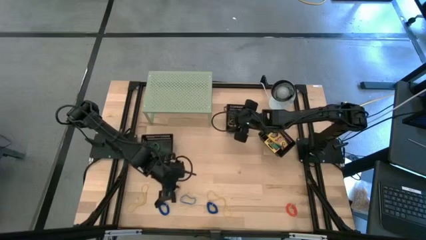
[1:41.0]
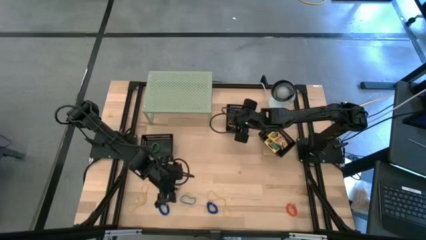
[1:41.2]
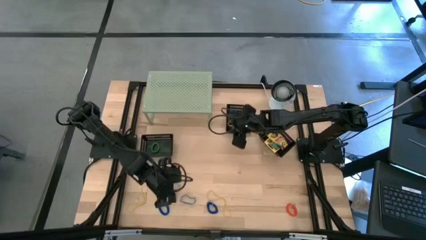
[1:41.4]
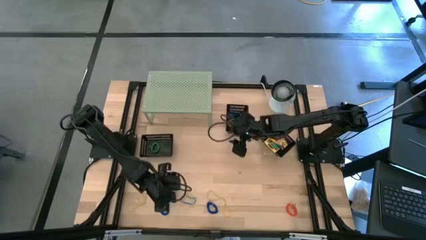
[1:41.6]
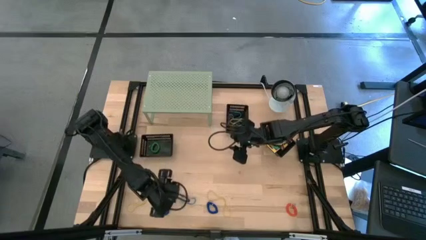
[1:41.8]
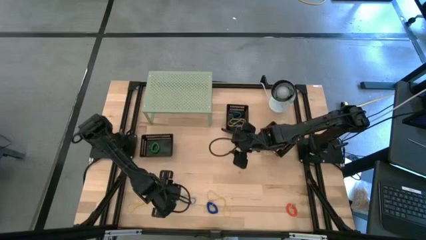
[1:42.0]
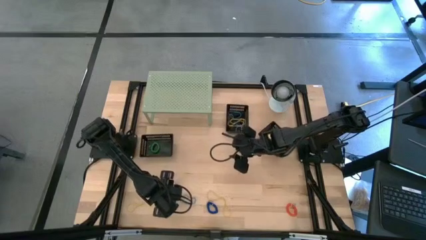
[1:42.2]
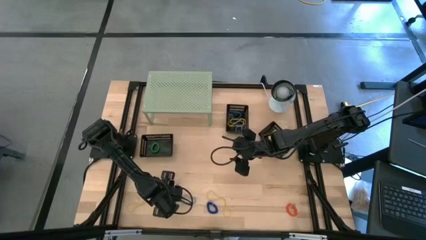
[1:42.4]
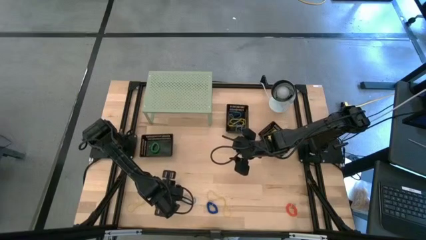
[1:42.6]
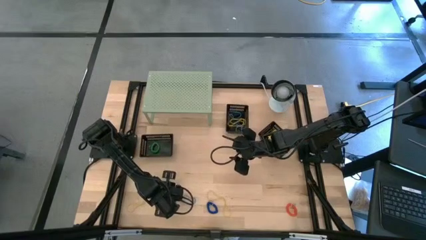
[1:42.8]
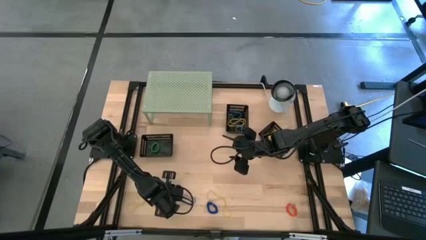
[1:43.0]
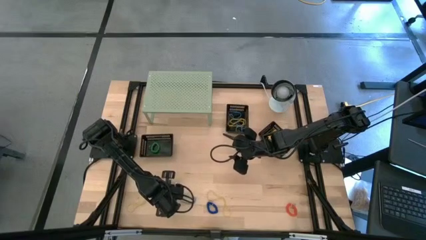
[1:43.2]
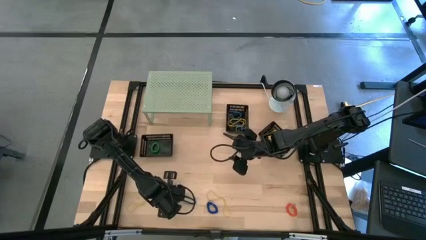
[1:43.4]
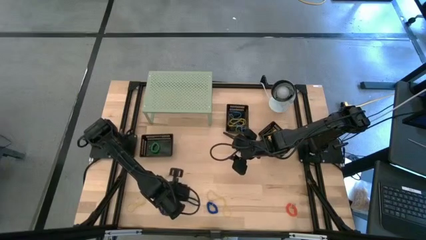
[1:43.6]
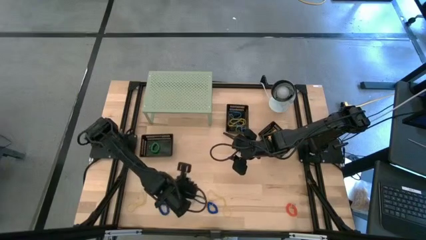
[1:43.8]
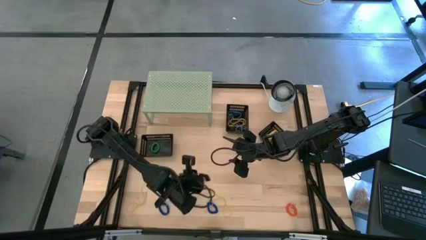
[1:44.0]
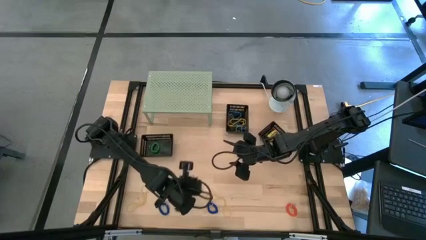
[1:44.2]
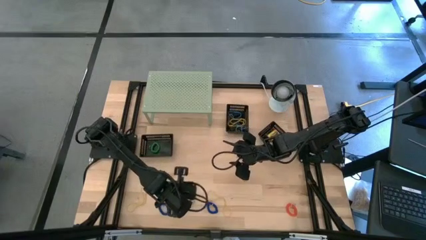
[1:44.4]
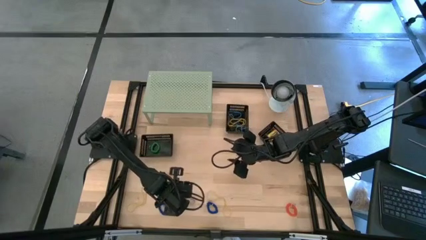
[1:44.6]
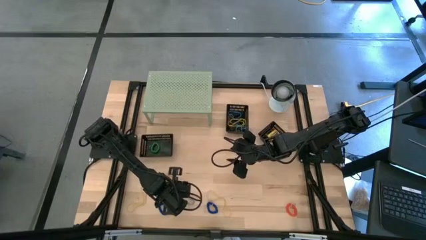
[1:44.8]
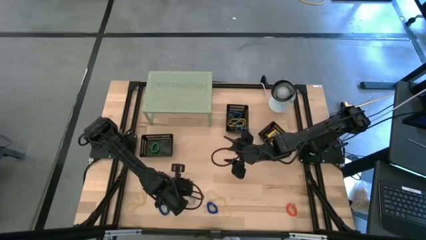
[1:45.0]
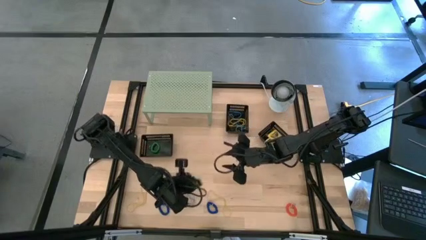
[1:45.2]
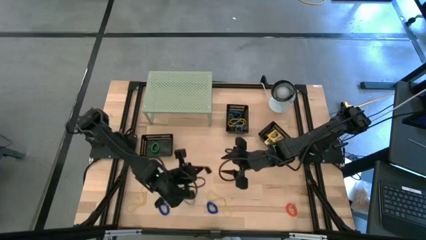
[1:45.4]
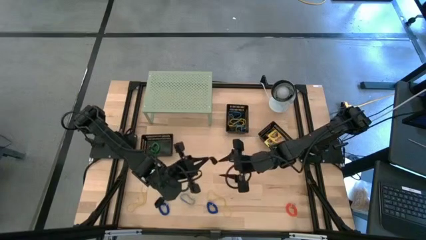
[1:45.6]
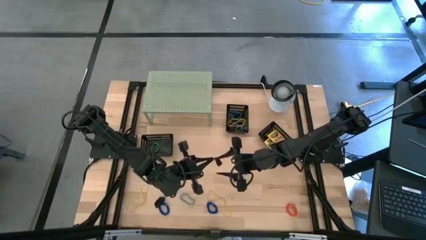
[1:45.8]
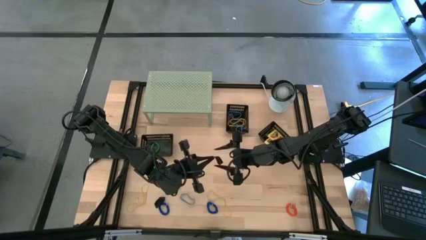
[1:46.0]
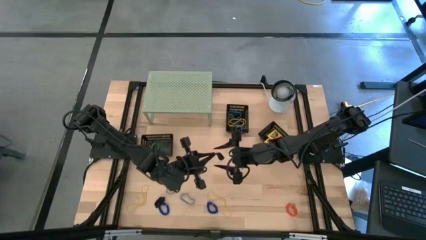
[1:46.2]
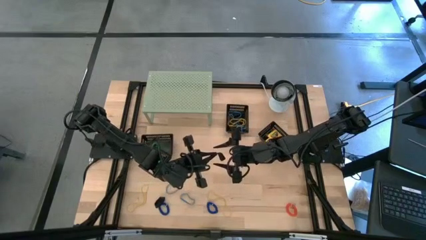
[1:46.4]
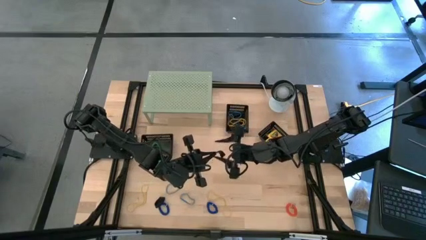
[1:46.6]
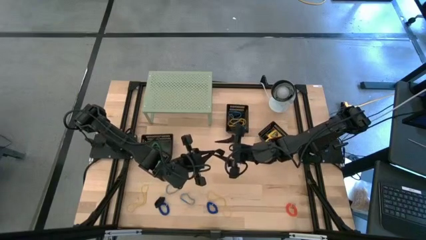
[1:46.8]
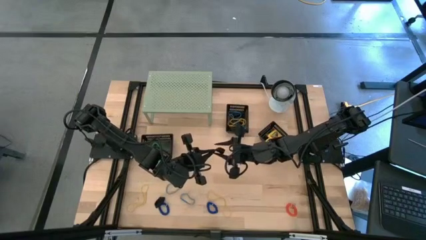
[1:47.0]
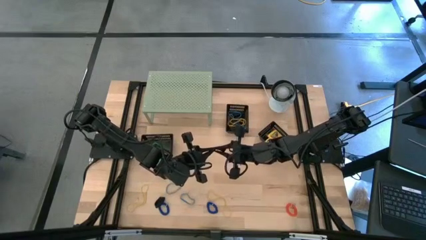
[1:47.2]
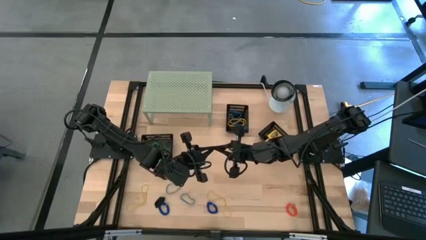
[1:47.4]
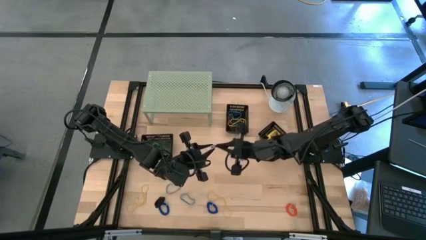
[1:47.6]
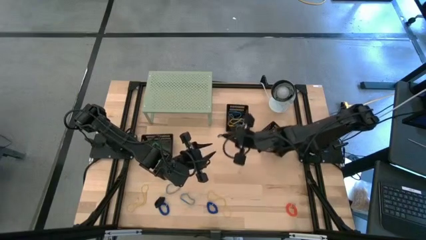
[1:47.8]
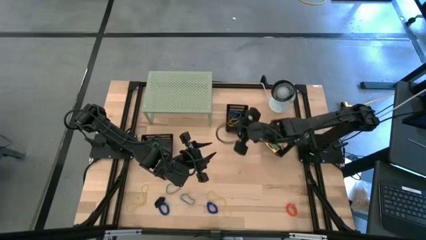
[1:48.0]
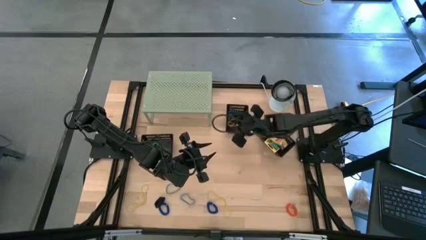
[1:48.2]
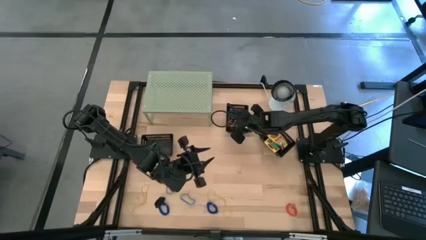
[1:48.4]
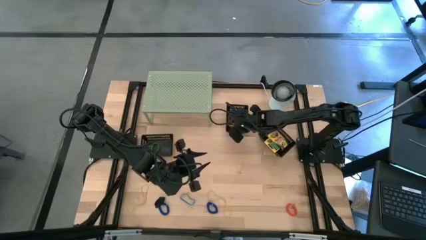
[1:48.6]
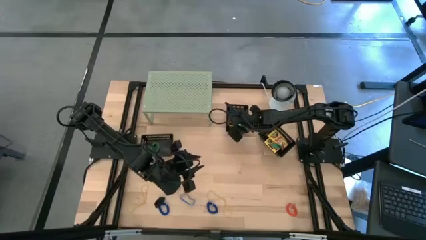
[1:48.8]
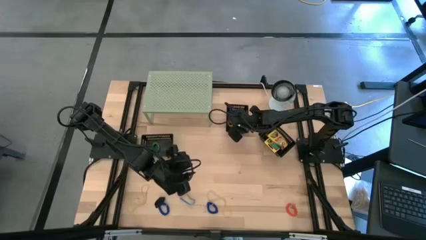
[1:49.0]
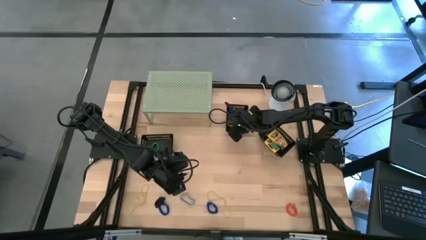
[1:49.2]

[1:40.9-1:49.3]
Task: Pick & Place Office Desk Supplies
Put the black rubber band into the top black bin

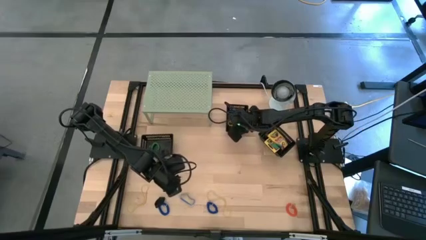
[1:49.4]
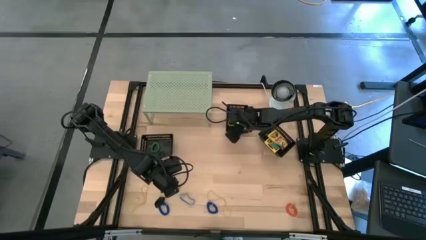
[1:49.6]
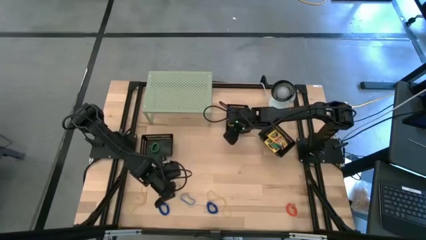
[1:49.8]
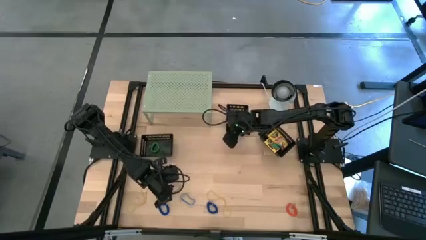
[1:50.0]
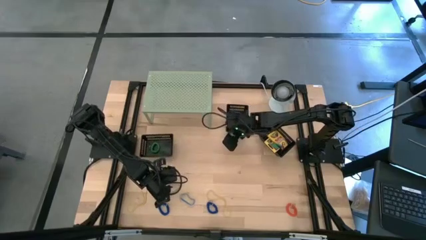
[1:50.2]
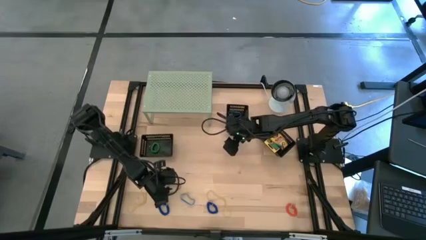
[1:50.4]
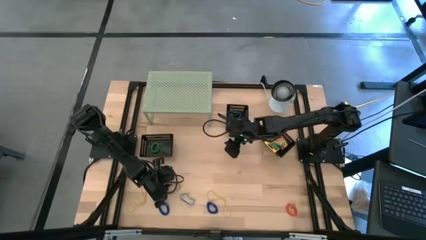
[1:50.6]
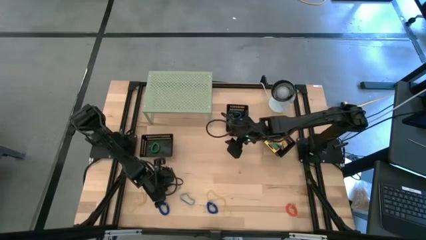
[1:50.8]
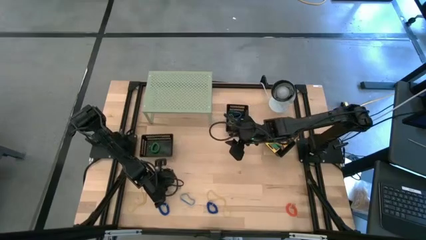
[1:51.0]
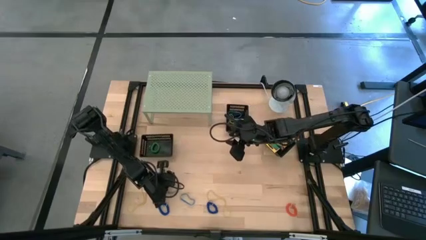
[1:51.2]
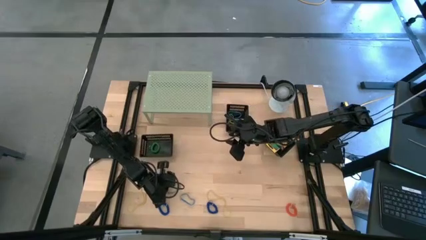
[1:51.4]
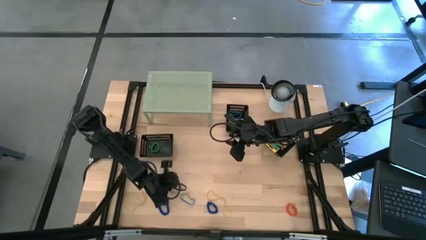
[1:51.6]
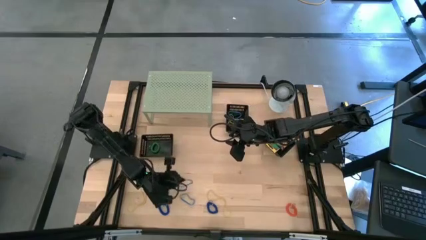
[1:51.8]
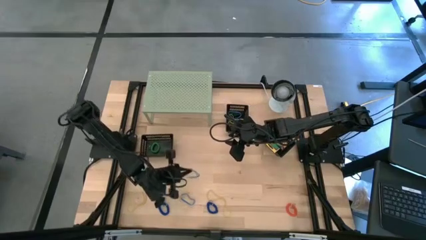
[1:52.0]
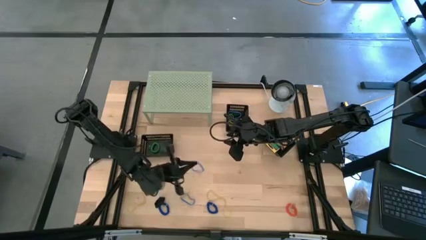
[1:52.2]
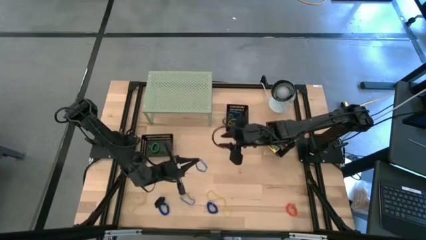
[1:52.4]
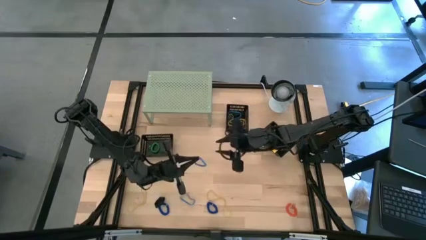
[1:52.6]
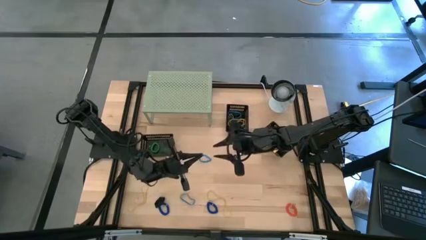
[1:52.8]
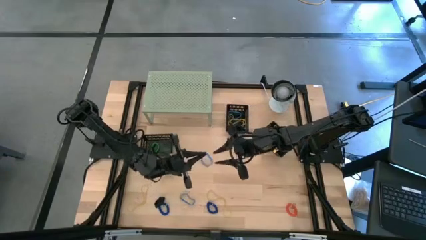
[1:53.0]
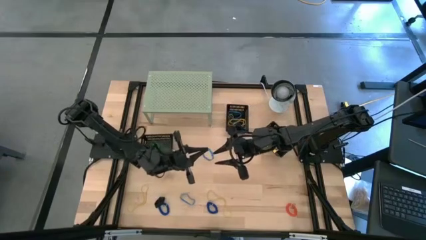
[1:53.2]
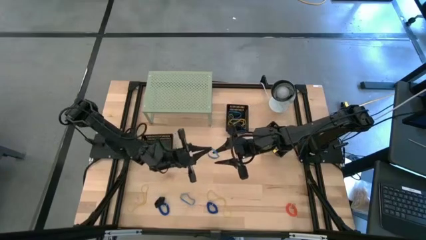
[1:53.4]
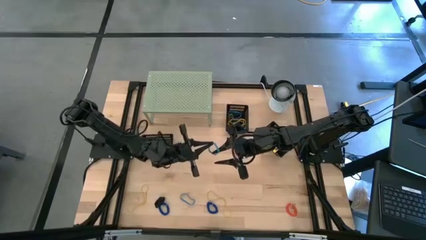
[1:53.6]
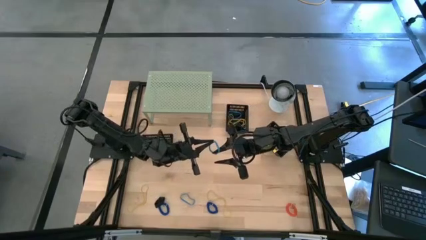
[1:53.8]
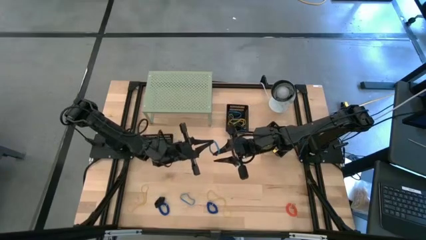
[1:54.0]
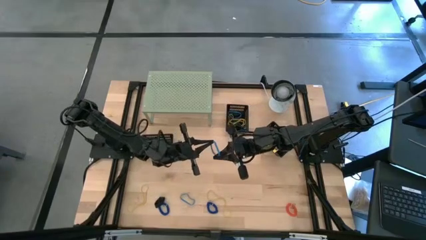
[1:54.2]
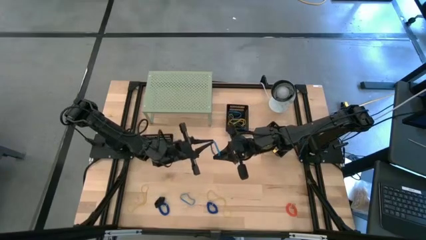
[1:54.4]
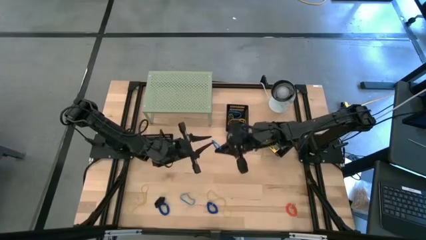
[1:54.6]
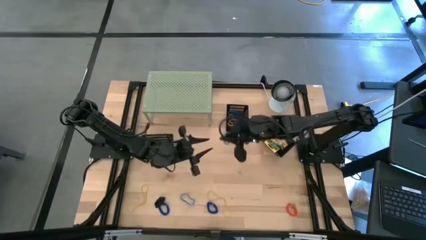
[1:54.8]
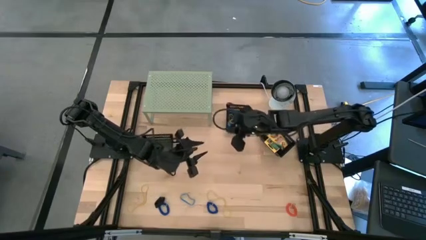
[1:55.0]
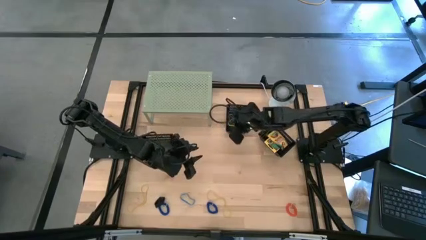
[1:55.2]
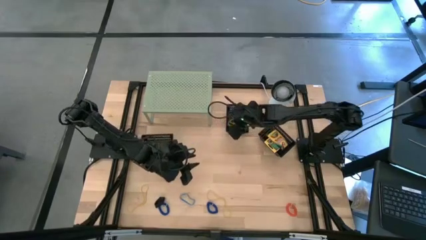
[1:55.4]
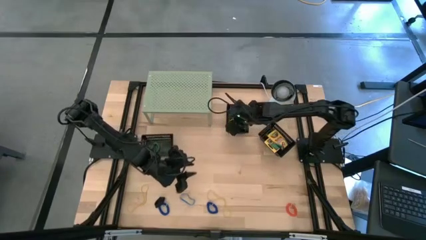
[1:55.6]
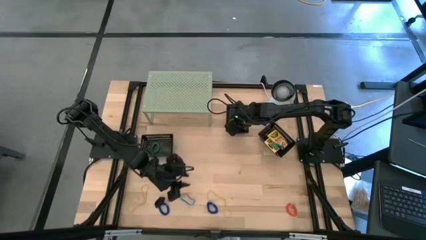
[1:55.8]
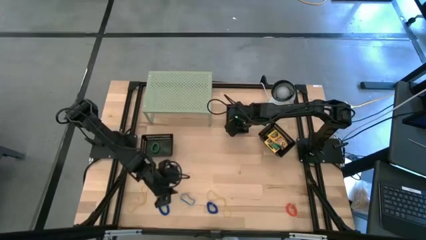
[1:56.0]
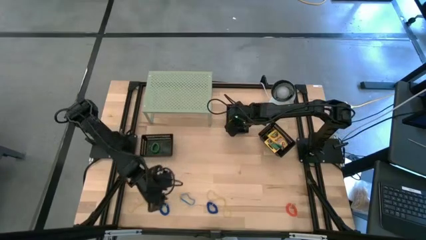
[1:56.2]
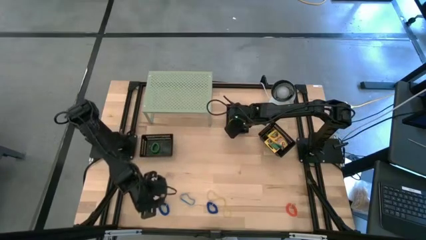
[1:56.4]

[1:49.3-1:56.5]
Put the blue rubber band into the top black bin
